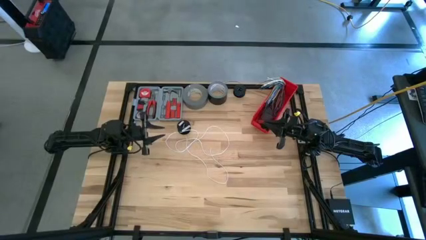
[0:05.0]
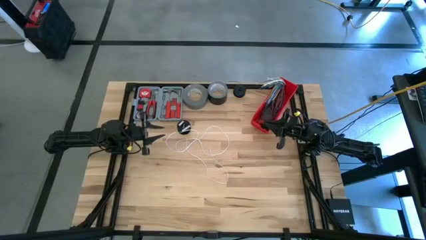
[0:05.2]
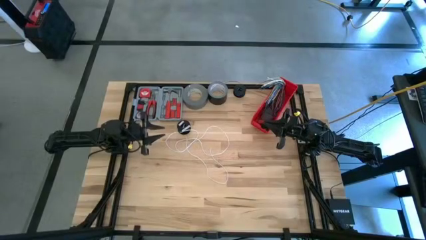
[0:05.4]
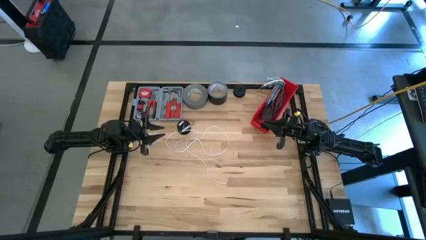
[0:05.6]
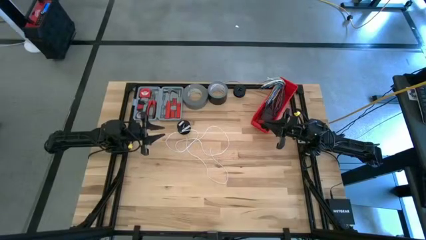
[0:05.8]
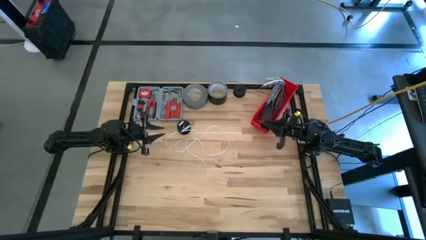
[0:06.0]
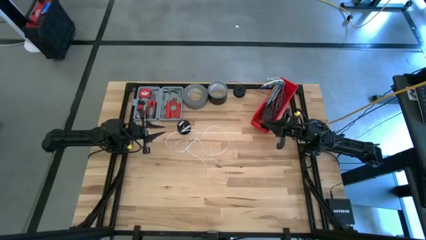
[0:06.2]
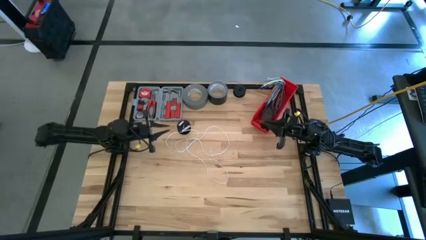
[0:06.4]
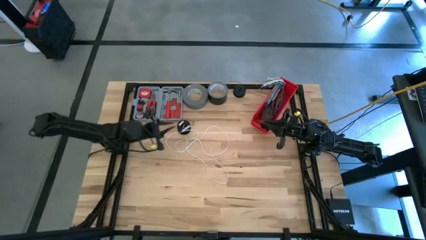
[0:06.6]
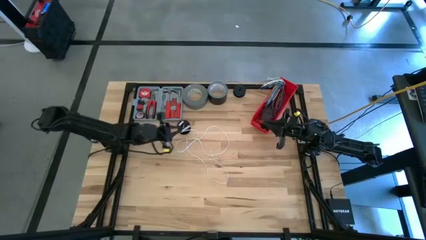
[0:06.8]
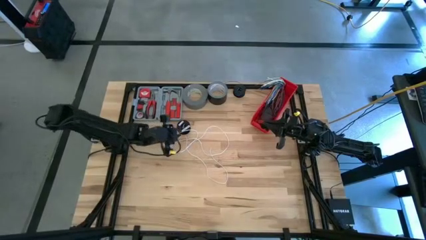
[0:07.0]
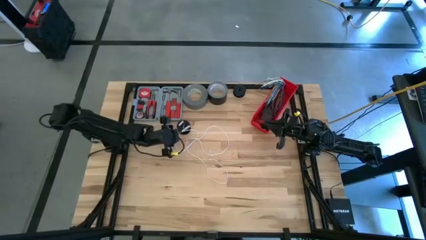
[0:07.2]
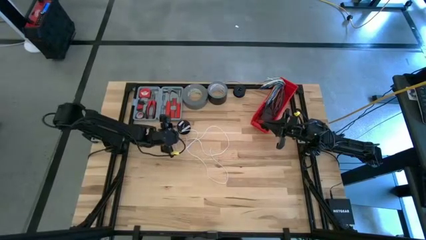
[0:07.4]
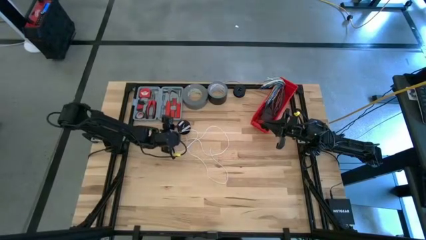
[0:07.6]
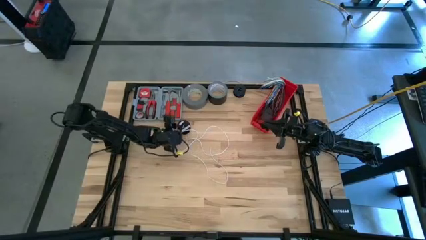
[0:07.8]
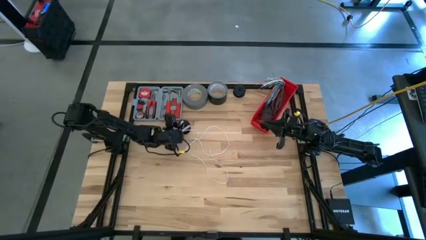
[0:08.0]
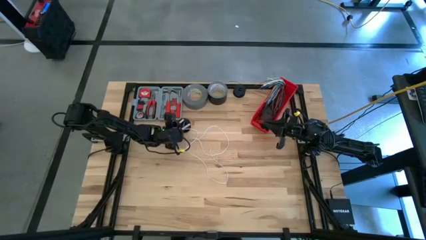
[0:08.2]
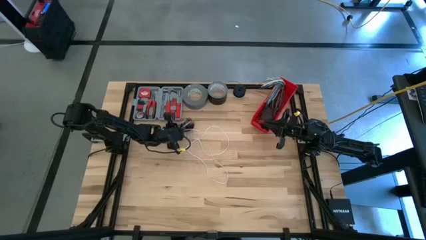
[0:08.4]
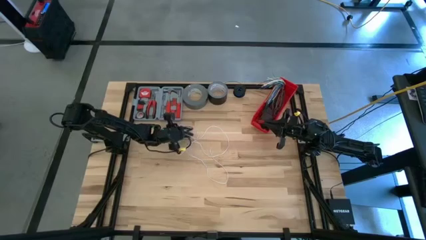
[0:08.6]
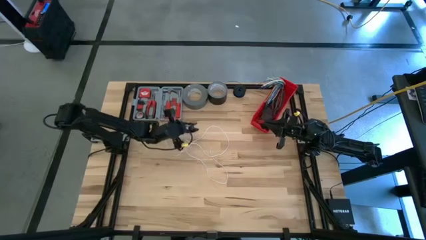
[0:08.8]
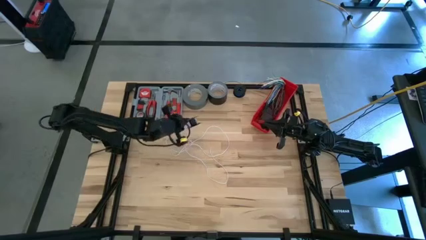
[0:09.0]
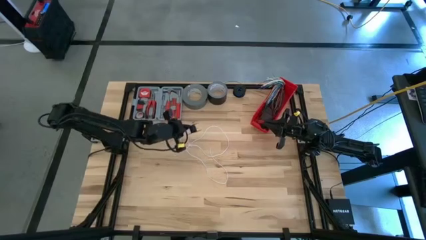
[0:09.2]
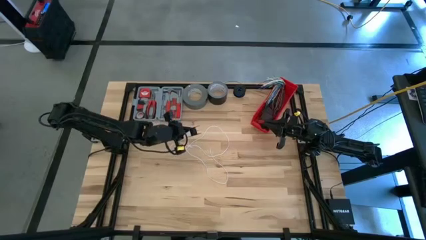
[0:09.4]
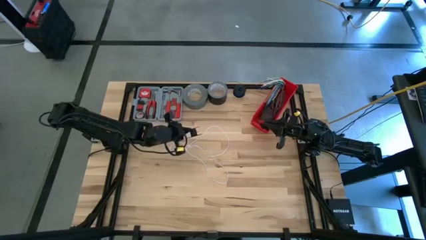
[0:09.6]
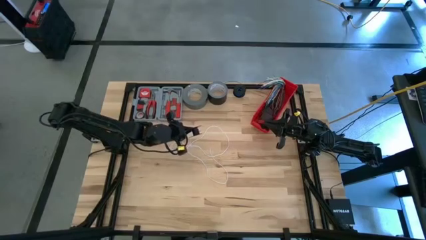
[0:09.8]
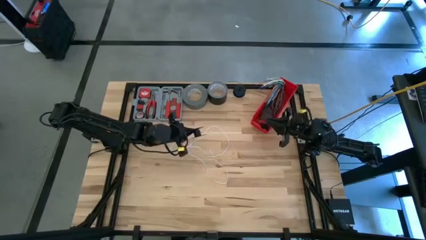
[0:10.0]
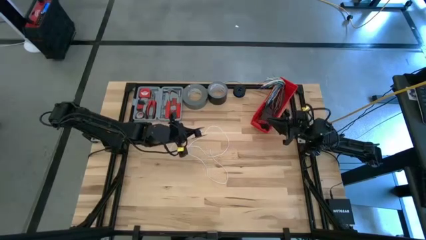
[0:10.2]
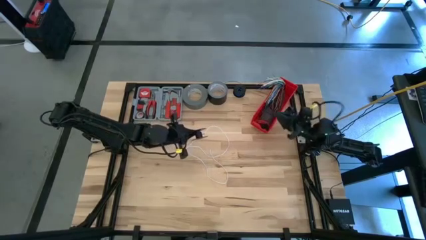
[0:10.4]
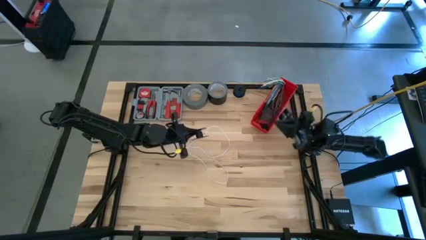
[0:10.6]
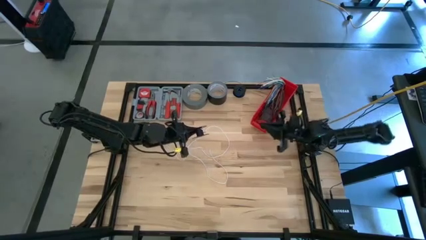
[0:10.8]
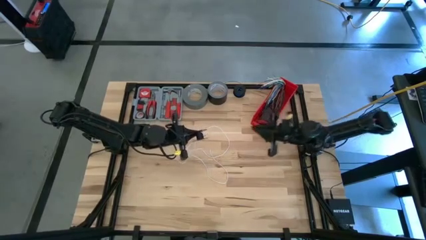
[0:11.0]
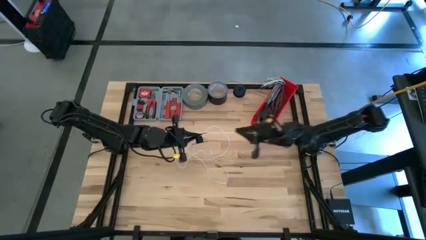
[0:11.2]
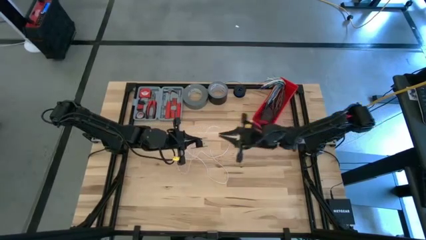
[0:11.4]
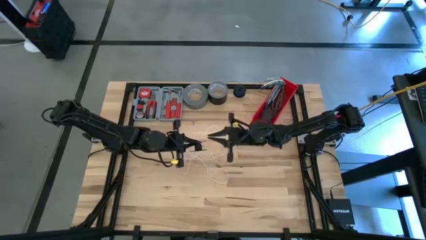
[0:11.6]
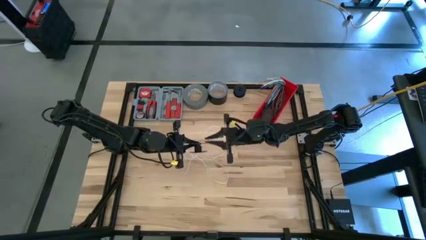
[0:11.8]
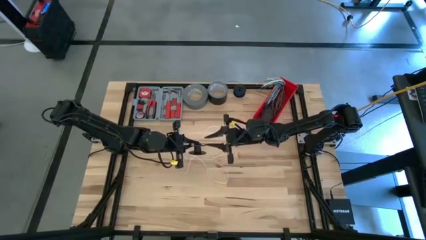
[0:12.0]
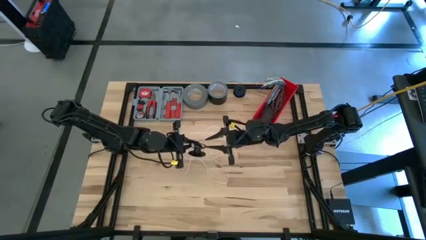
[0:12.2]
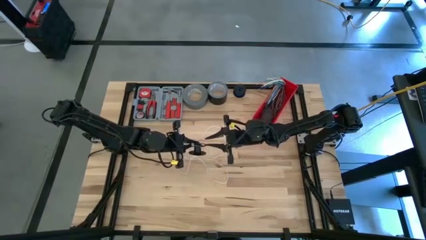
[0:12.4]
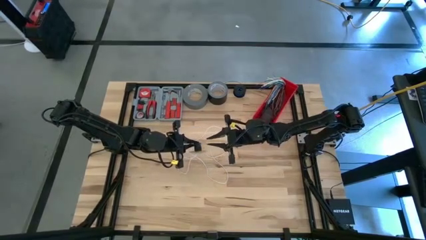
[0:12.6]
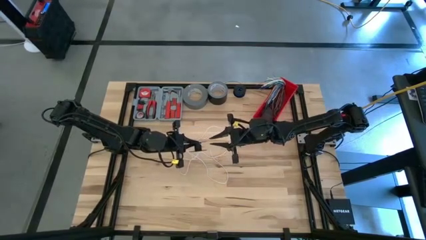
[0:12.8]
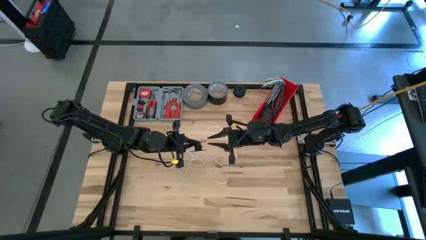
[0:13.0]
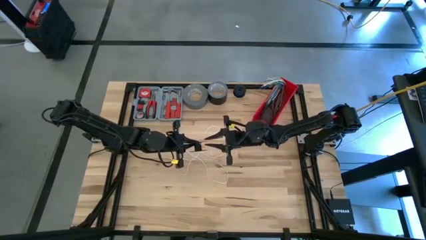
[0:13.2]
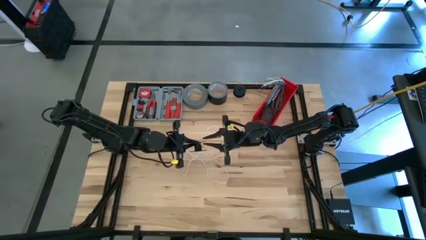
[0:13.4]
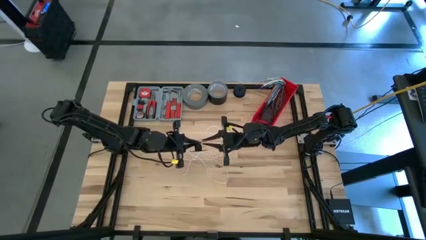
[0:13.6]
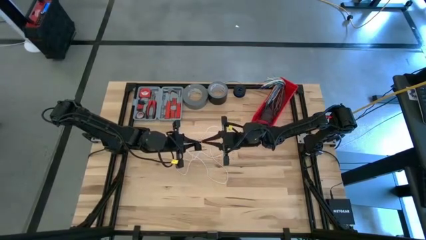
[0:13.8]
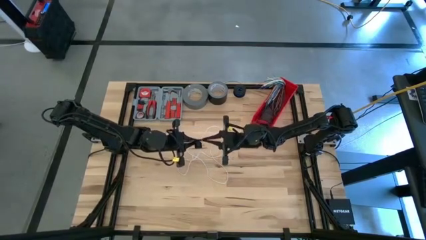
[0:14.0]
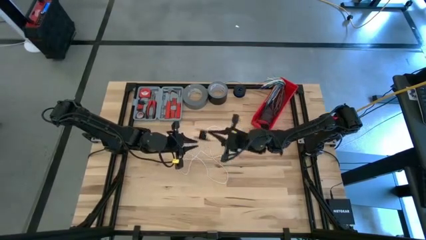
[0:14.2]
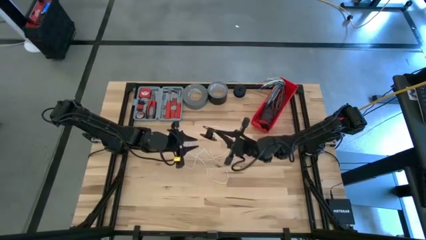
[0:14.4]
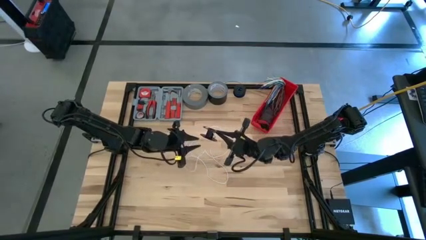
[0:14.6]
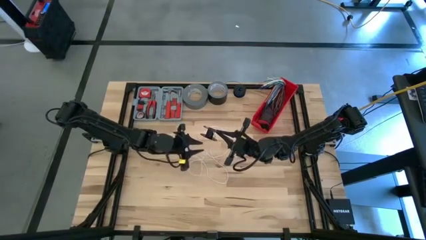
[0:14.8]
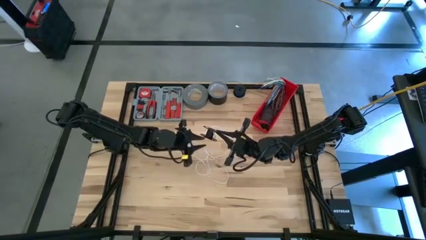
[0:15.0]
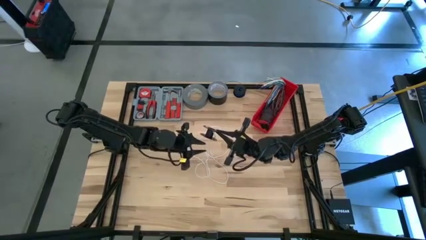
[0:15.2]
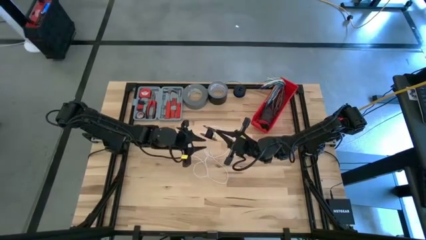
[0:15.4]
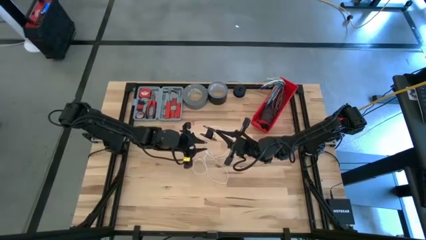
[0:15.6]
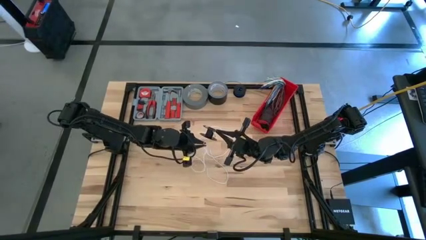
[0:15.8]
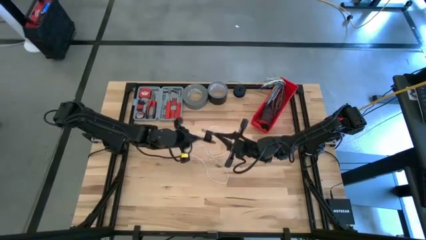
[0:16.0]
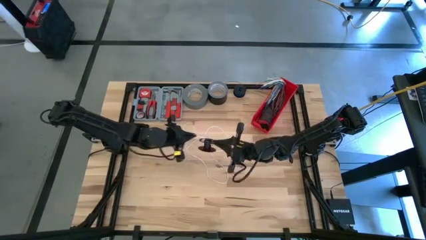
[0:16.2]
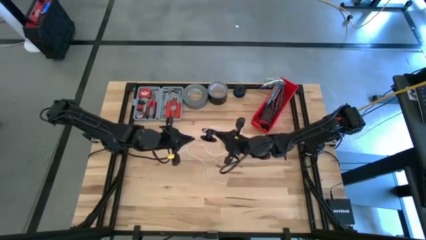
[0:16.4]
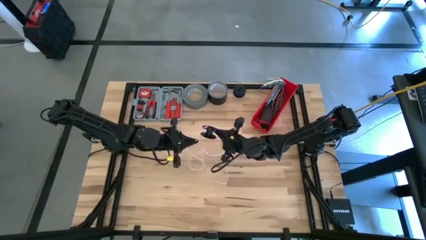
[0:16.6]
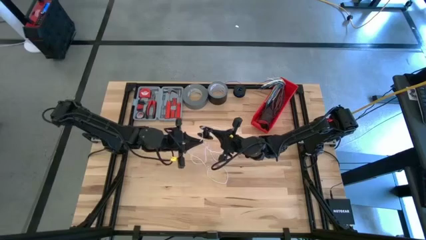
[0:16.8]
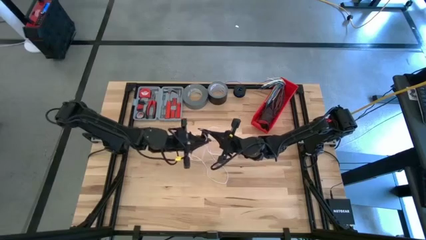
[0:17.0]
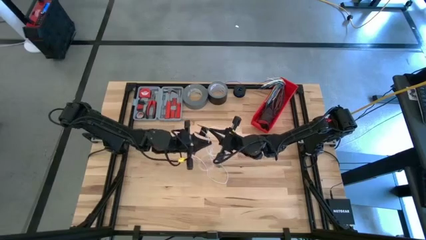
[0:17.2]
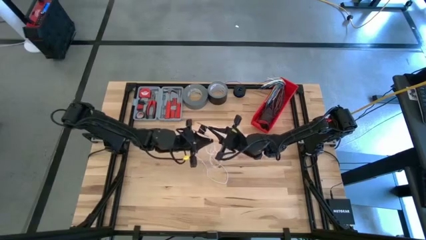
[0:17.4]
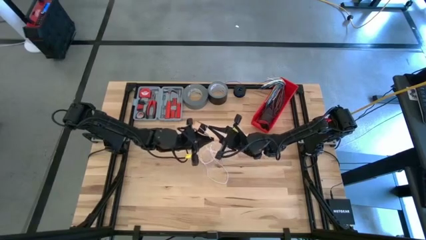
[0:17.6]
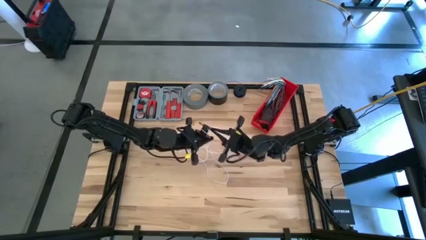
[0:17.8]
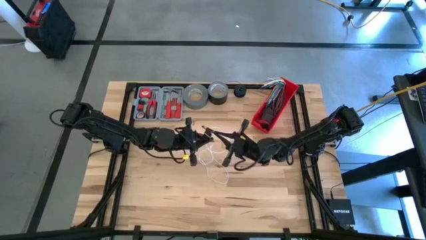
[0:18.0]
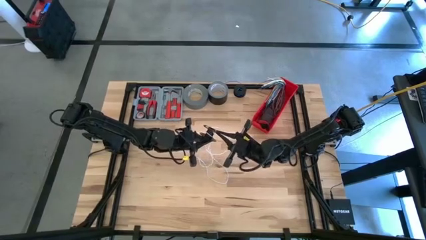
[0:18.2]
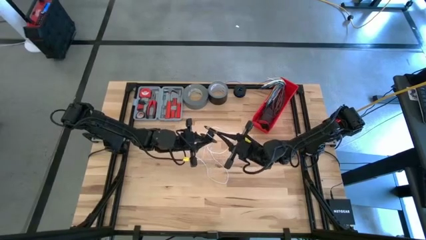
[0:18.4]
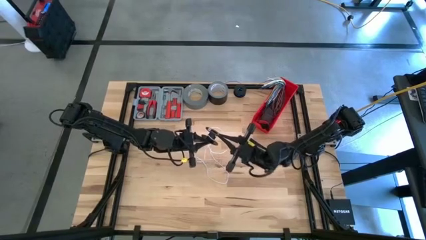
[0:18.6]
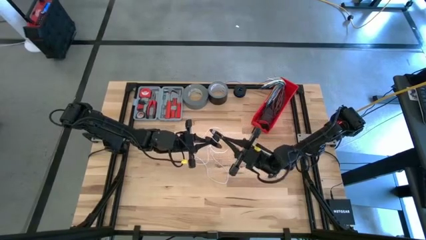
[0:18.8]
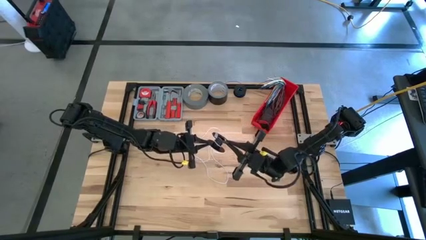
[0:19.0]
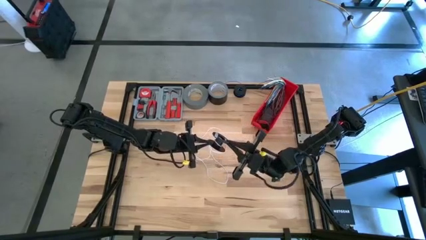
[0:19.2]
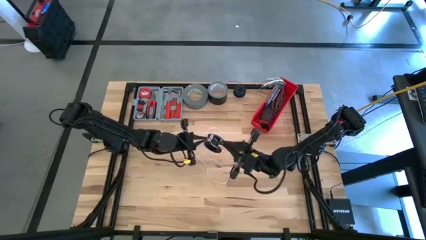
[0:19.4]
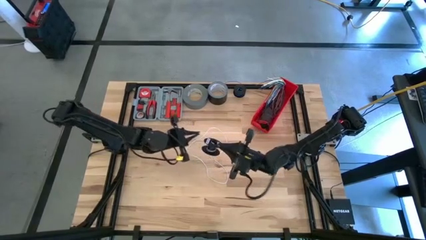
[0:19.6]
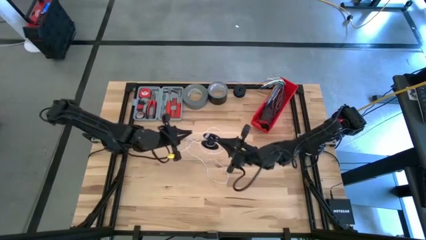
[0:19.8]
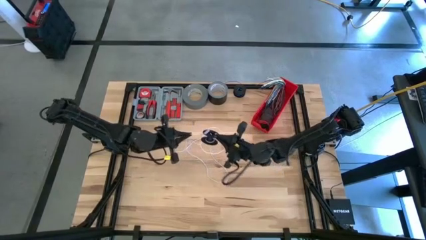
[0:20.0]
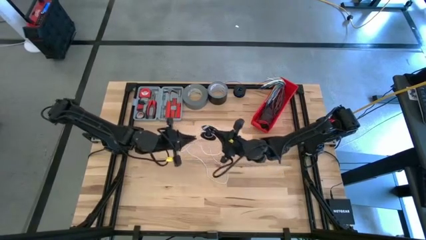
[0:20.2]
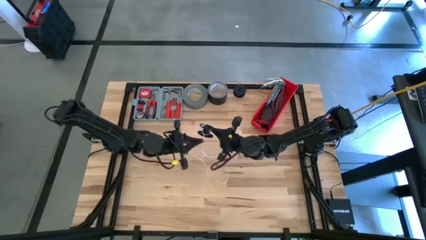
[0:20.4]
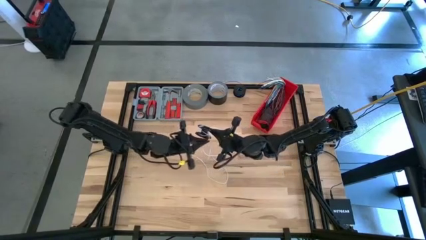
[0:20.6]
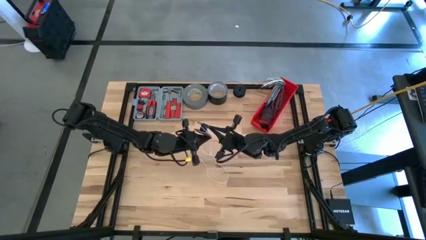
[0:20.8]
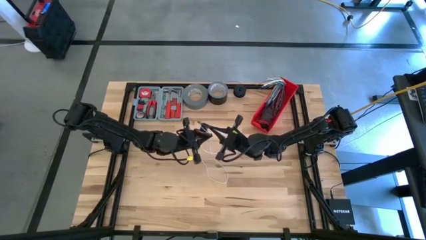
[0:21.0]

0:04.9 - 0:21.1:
Task: Coil cords
Coil the white wire onto the spool
